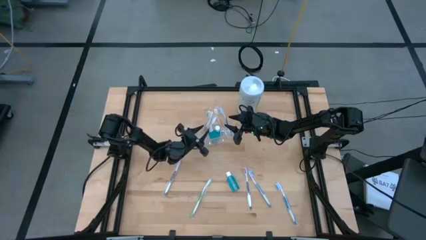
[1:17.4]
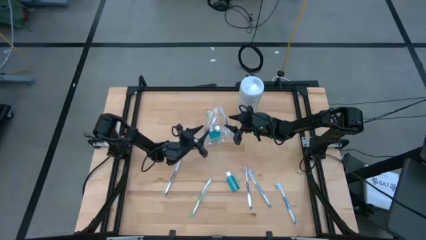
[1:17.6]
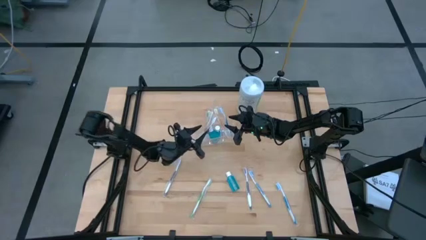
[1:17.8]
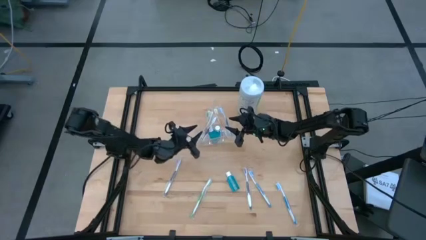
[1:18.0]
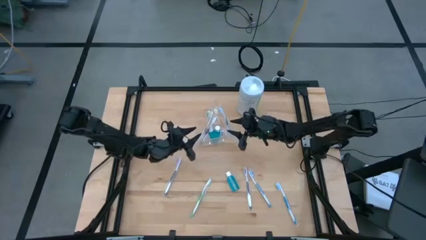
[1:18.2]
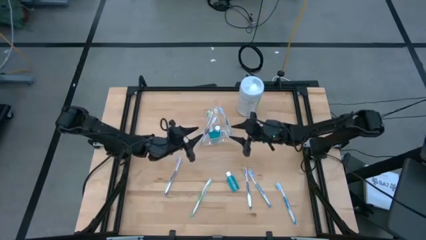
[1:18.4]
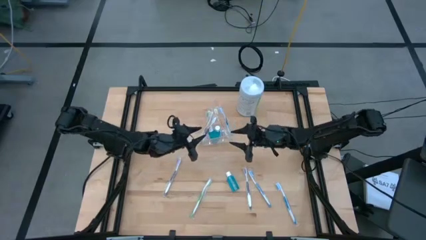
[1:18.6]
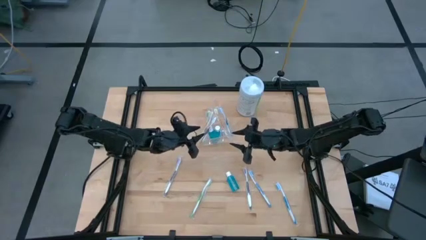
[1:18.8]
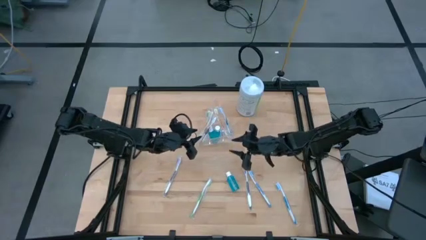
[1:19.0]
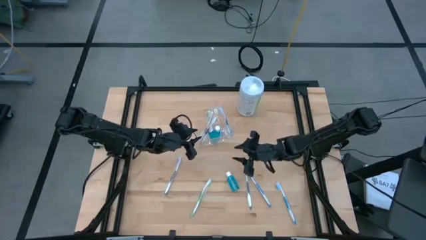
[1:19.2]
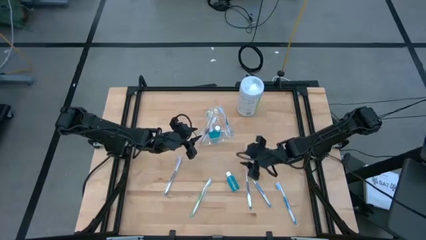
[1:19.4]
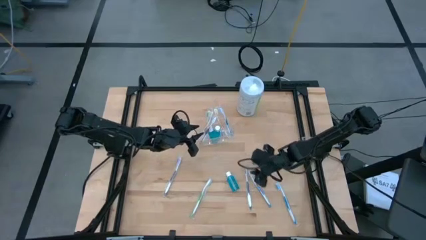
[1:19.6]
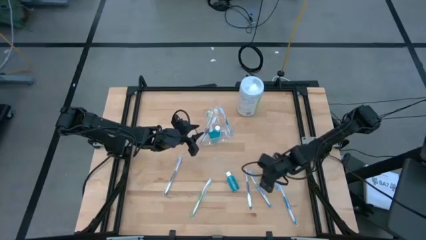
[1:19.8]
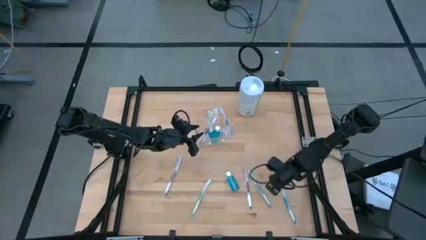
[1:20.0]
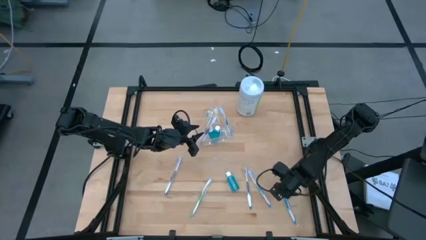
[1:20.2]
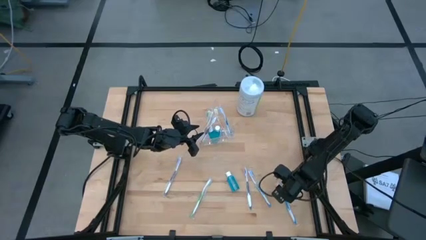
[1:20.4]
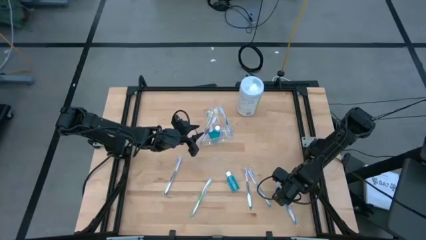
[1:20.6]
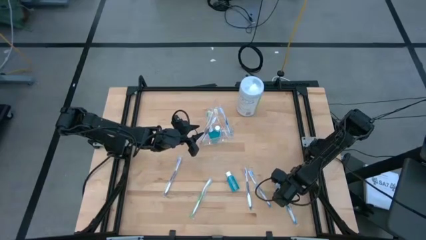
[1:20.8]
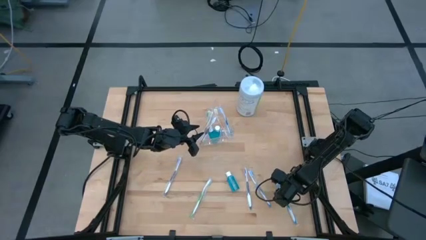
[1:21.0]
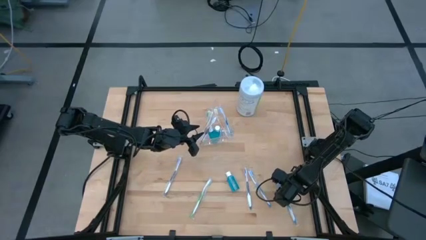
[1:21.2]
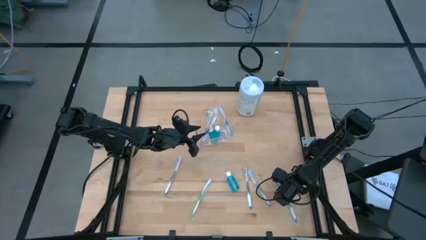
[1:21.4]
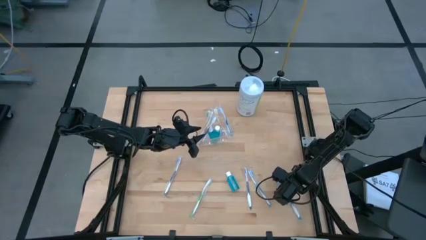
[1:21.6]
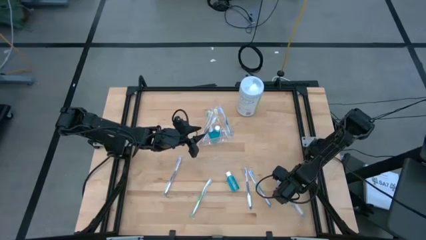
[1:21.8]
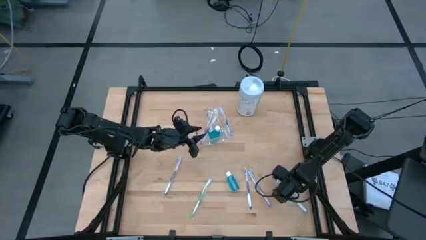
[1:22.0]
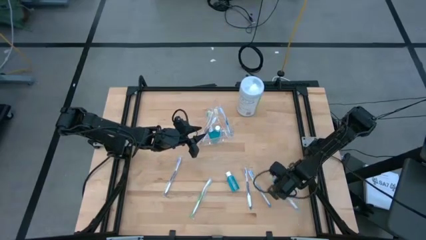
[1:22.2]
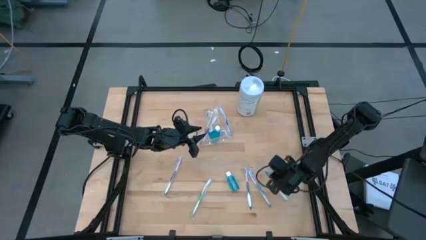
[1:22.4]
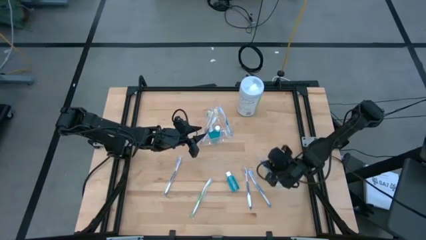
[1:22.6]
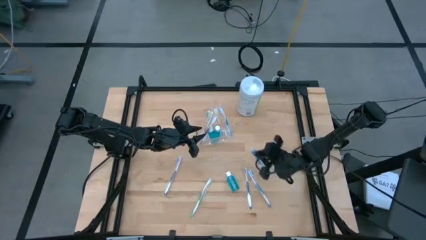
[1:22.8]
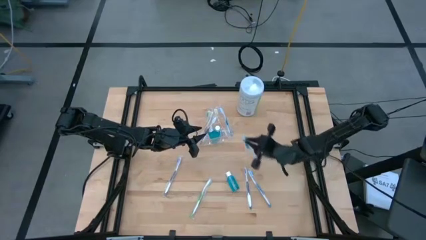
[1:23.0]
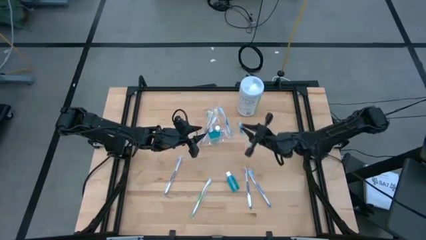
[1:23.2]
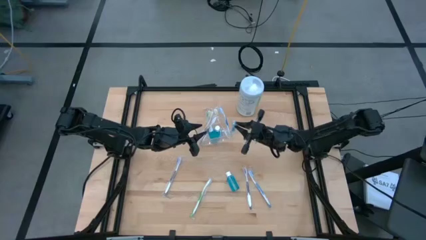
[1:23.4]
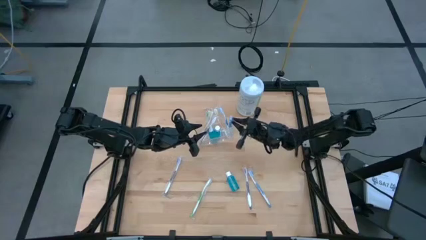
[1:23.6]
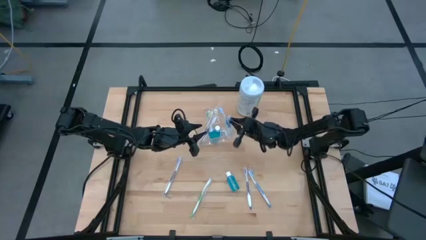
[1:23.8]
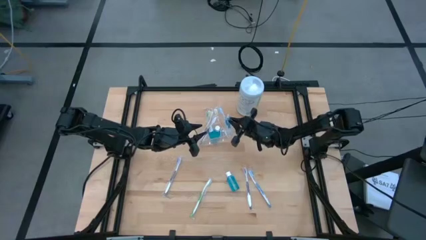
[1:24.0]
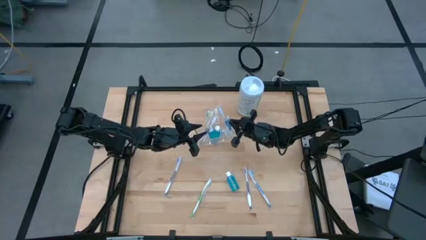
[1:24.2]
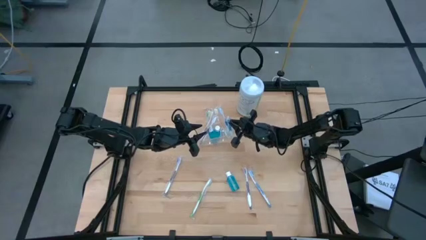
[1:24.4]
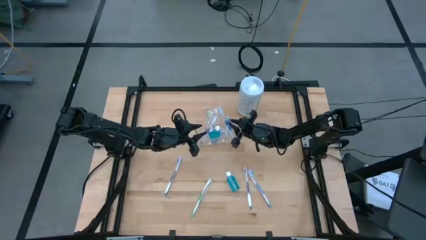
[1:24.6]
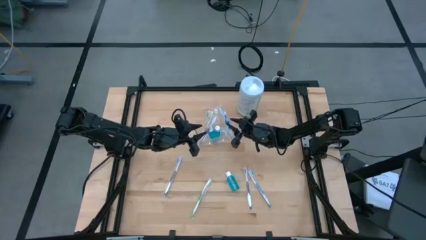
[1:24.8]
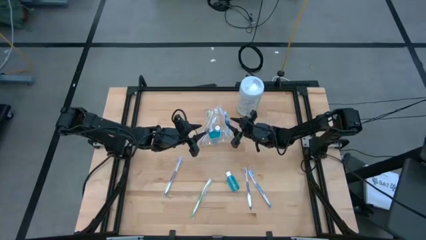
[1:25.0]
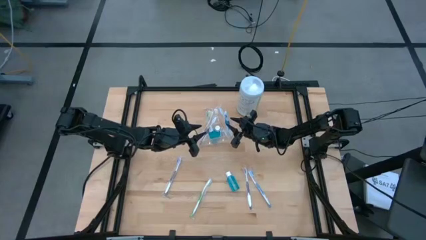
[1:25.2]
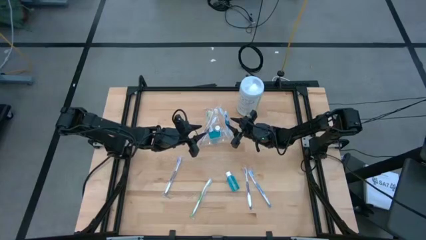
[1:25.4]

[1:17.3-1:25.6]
Task: Pick & Place toothbrushing station
Put the right blue toothbrush into the transparent organizer

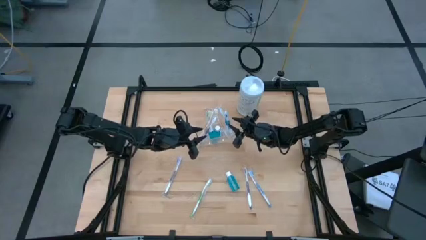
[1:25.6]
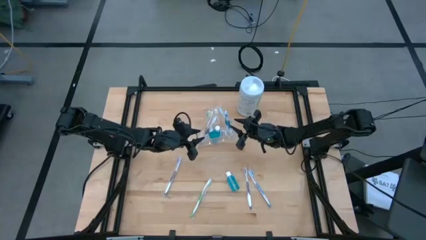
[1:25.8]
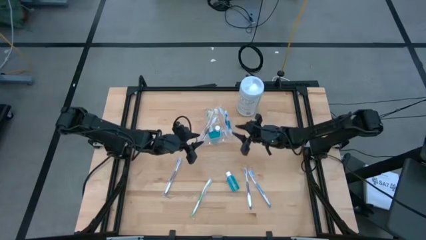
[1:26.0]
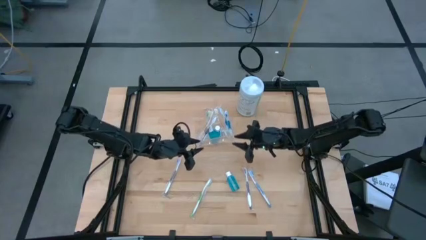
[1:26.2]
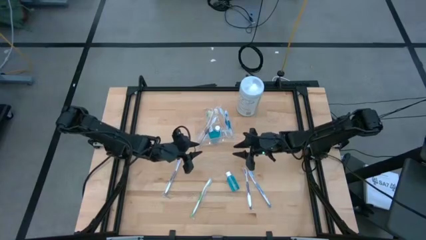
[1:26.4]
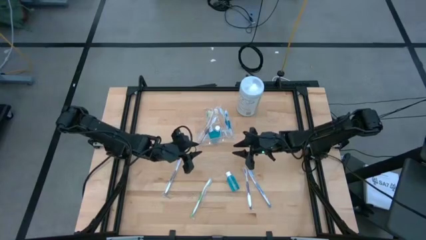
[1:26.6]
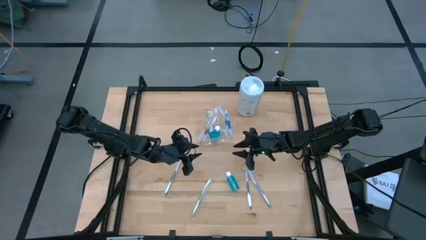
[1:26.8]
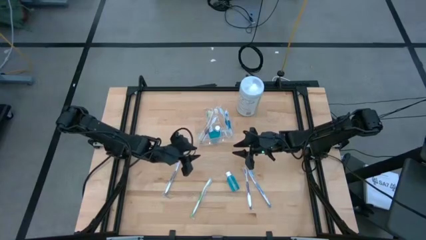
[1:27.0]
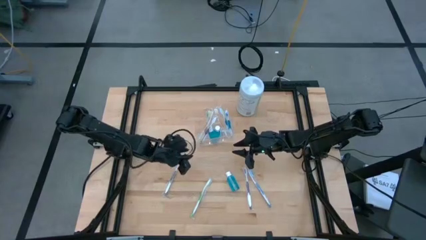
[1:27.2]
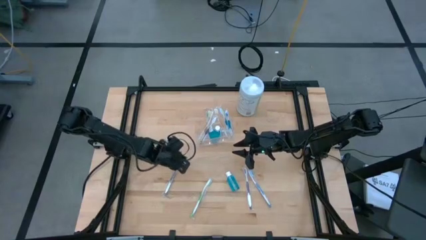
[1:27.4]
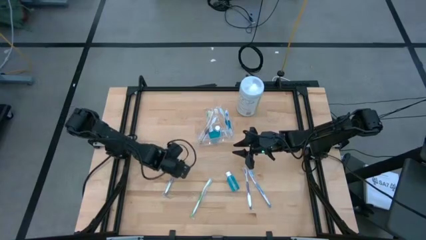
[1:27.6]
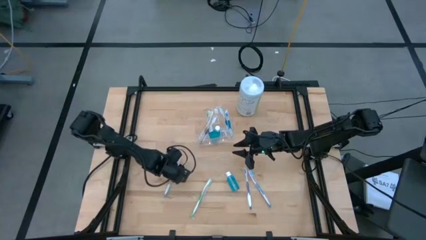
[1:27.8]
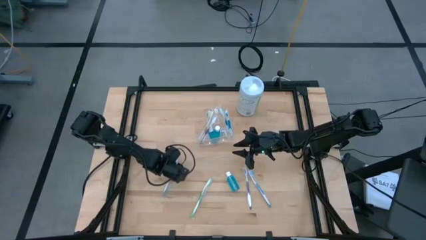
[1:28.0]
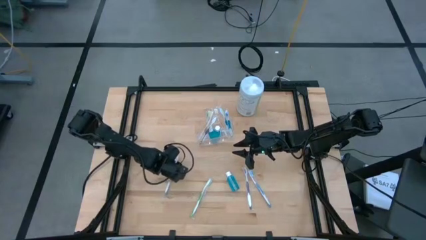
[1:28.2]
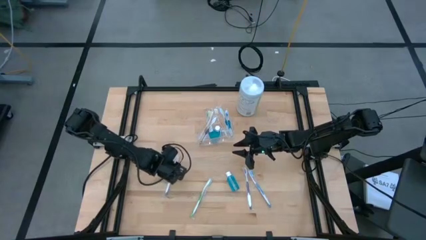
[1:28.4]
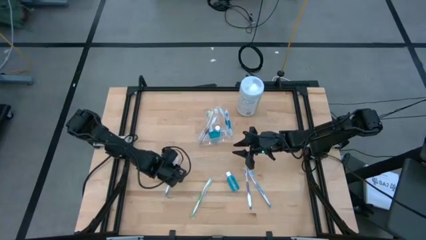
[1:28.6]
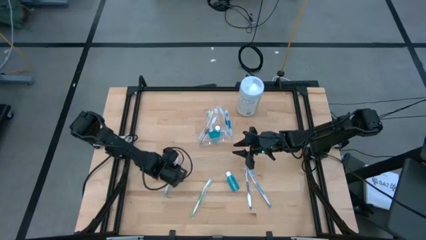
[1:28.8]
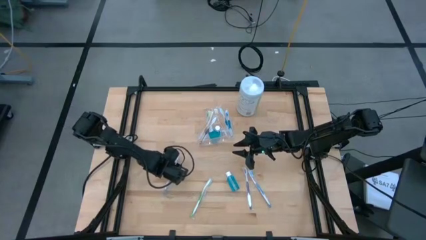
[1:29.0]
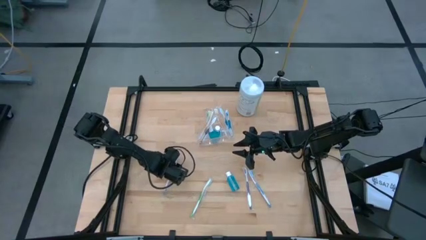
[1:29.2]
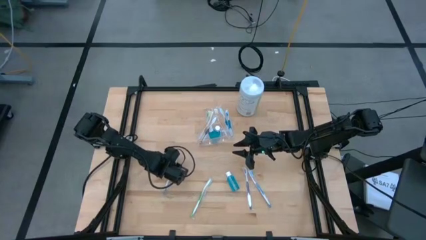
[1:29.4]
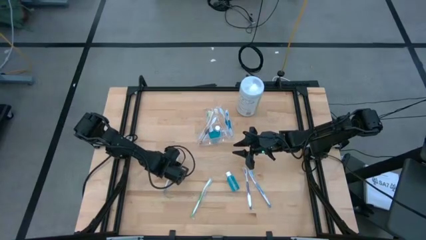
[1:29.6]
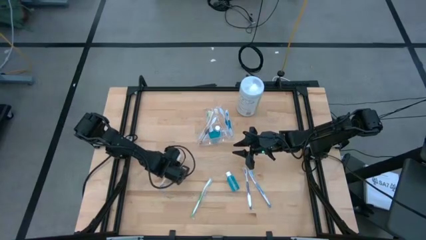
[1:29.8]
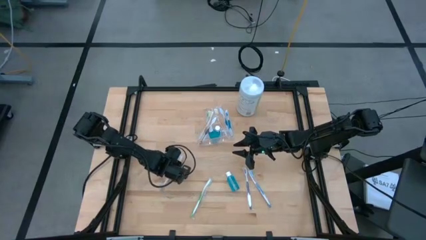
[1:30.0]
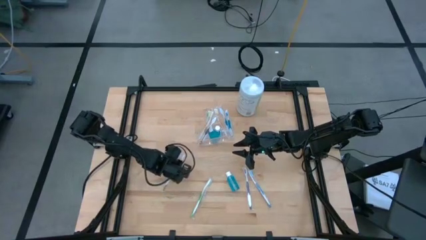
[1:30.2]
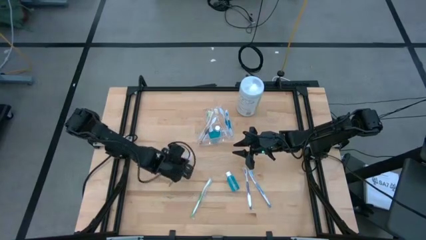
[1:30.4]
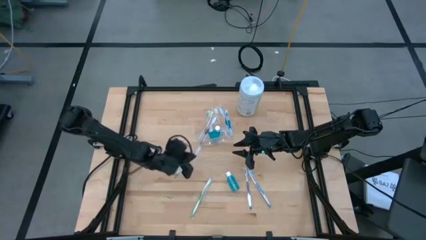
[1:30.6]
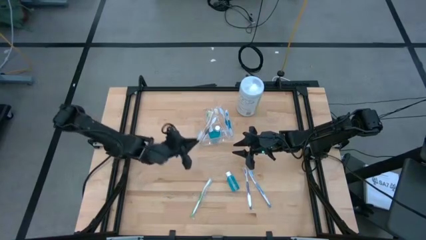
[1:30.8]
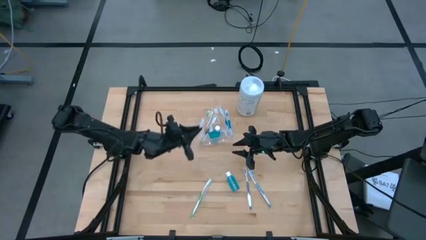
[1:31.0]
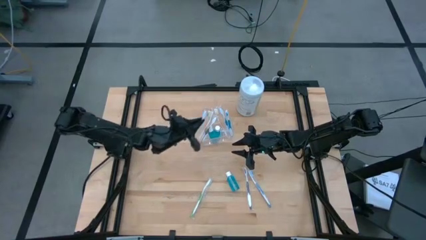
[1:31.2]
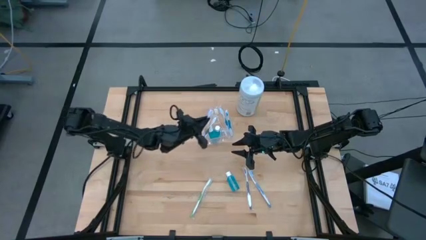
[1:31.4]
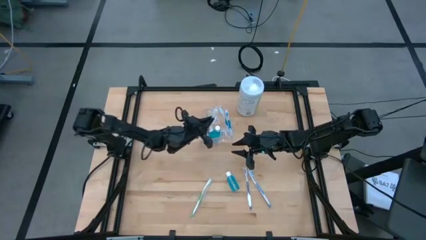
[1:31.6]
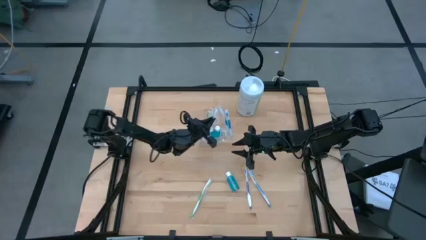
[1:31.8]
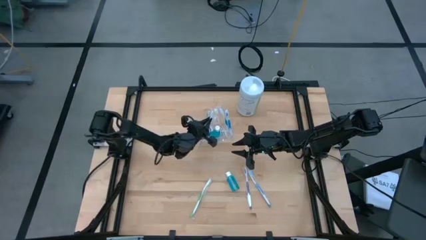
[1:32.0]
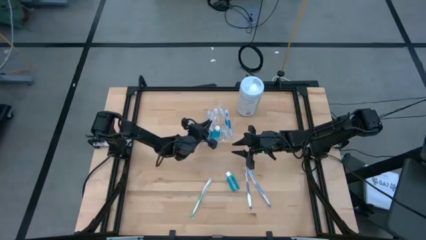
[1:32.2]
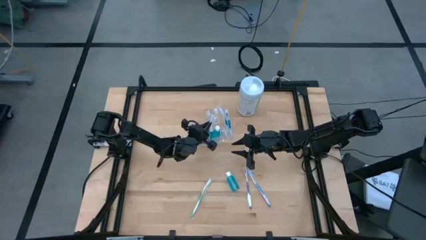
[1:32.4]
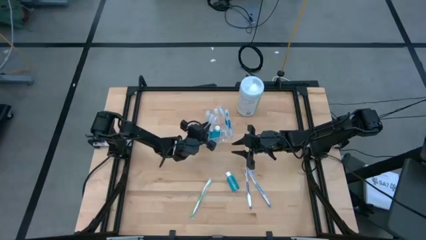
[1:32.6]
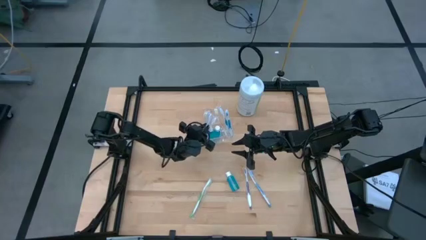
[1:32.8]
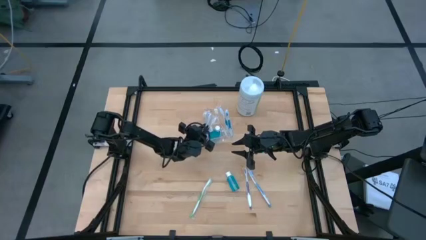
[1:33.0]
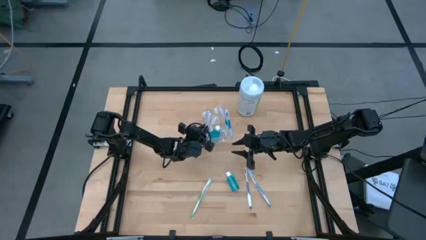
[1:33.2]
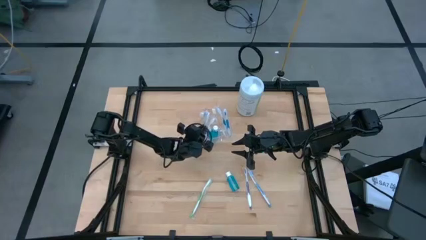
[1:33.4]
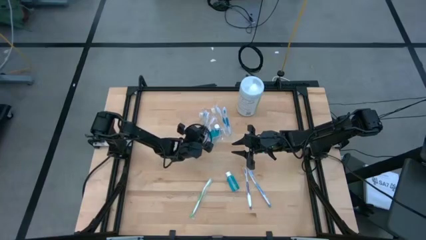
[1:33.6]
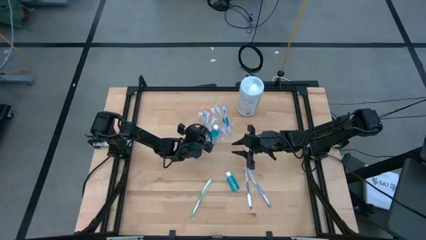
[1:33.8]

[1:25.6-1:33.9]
Put the left purple toothbrush into the transparent organizer
